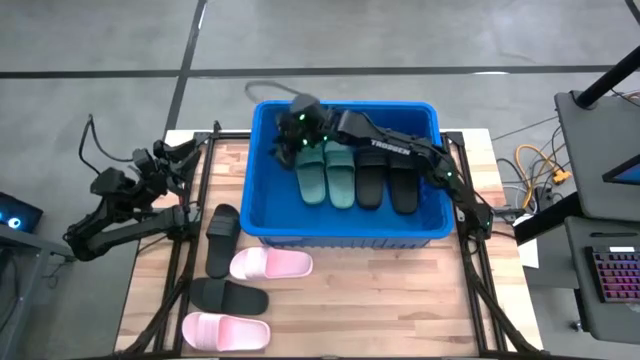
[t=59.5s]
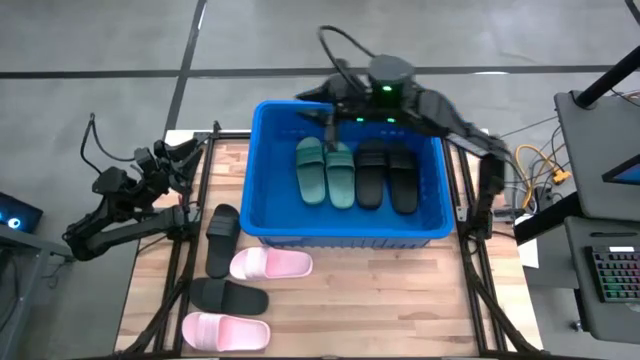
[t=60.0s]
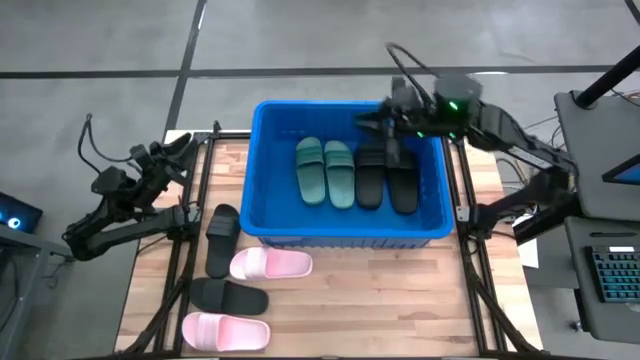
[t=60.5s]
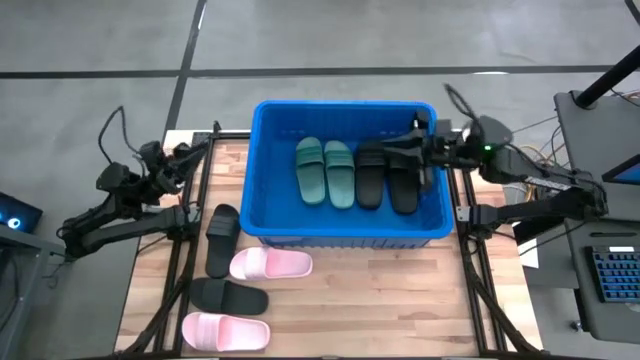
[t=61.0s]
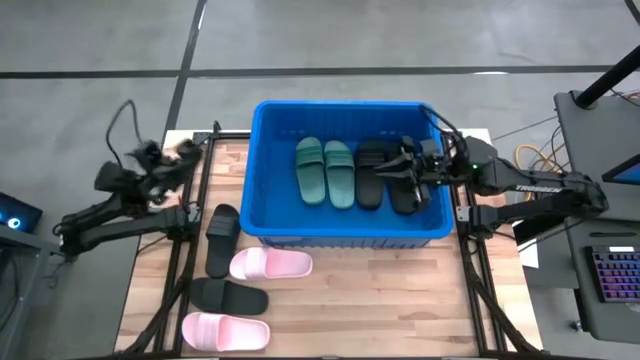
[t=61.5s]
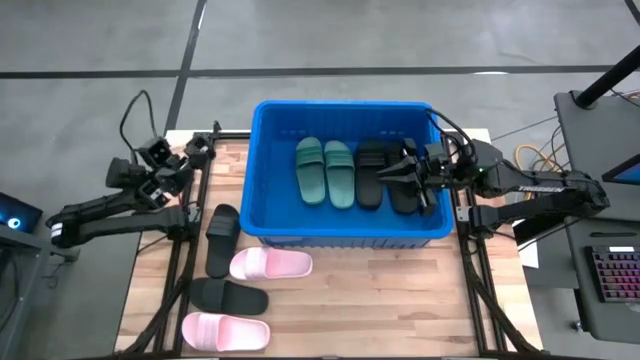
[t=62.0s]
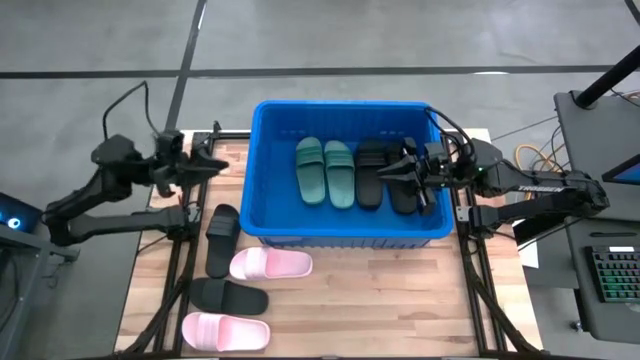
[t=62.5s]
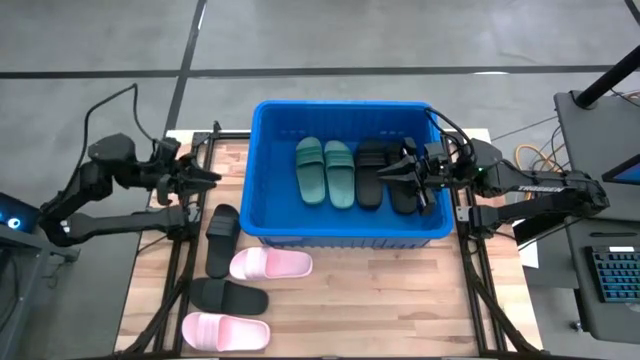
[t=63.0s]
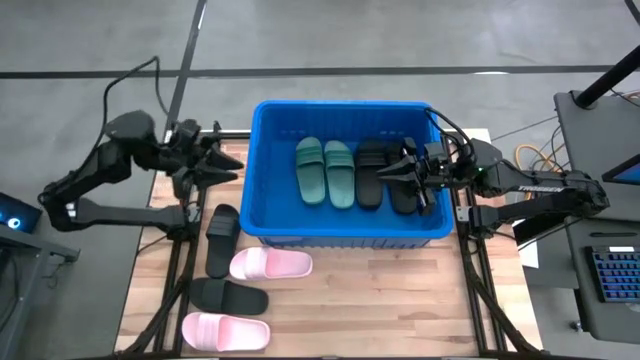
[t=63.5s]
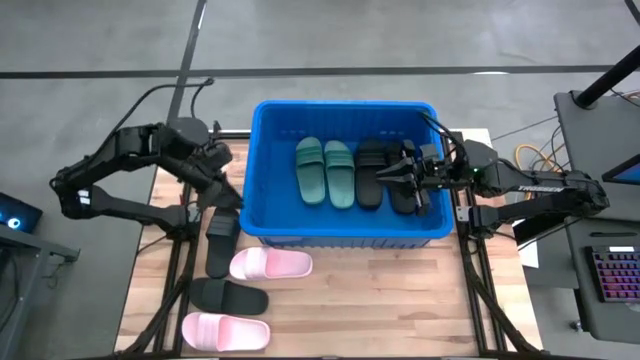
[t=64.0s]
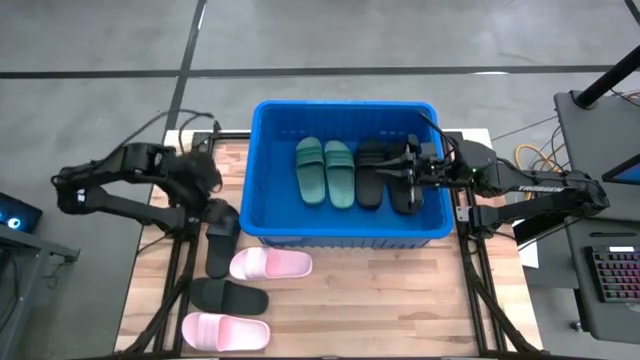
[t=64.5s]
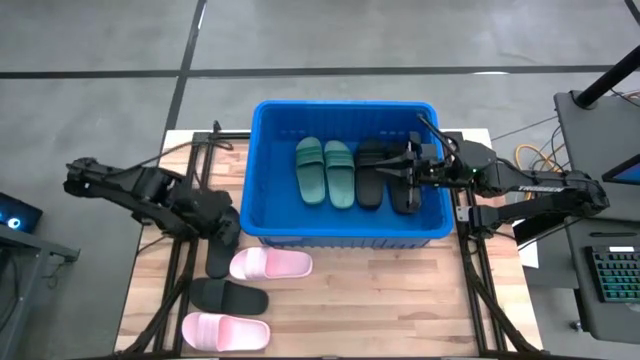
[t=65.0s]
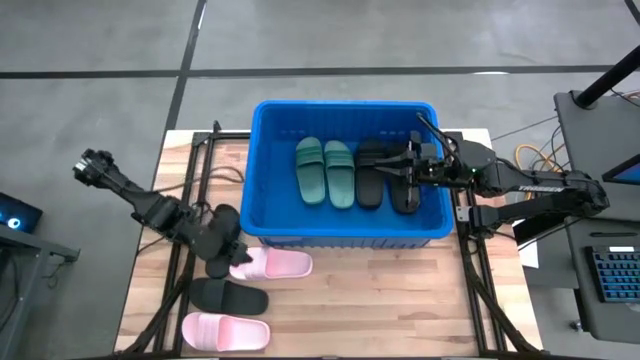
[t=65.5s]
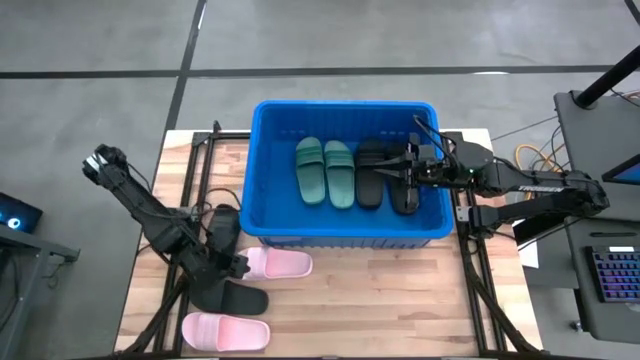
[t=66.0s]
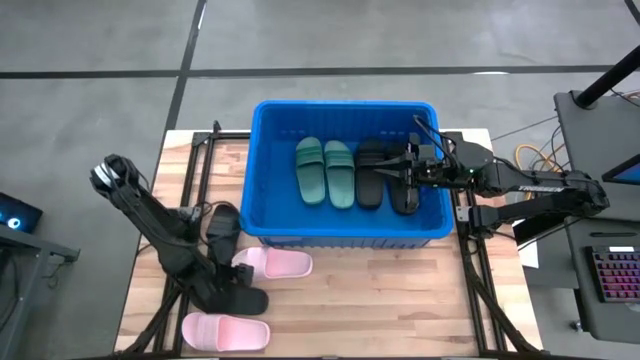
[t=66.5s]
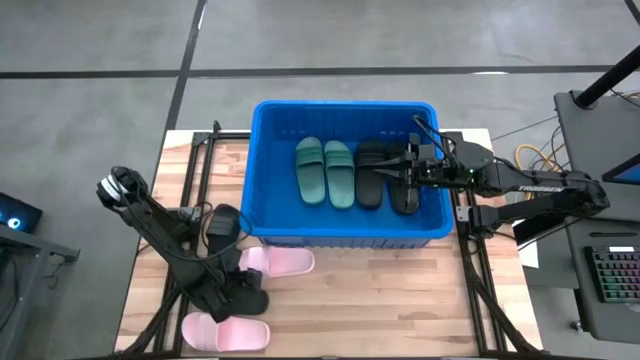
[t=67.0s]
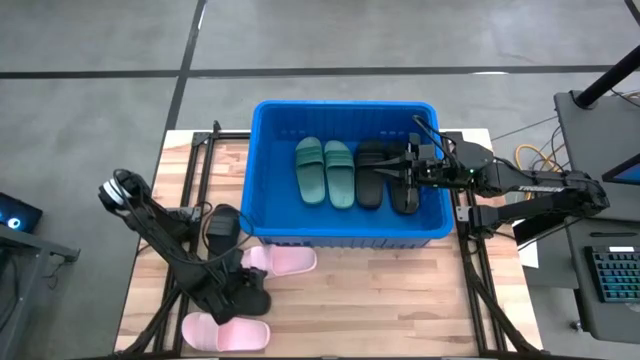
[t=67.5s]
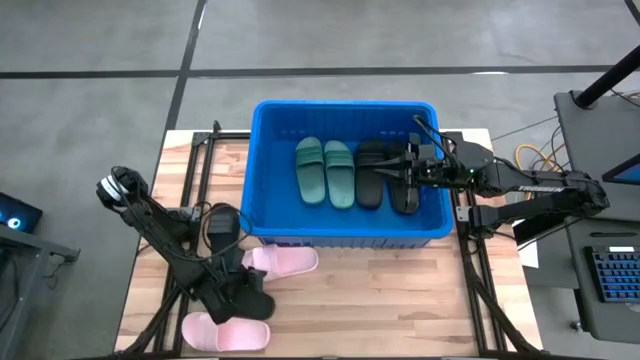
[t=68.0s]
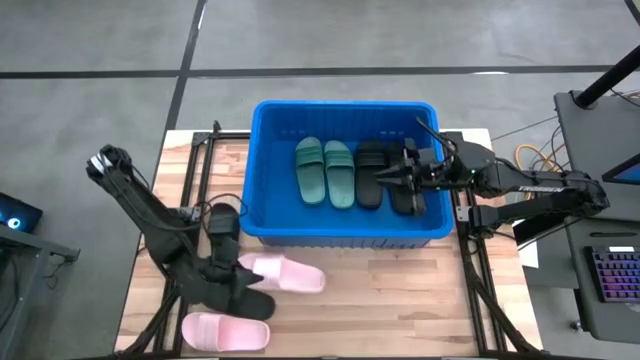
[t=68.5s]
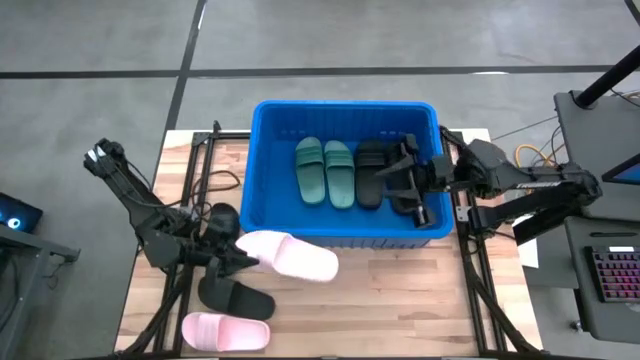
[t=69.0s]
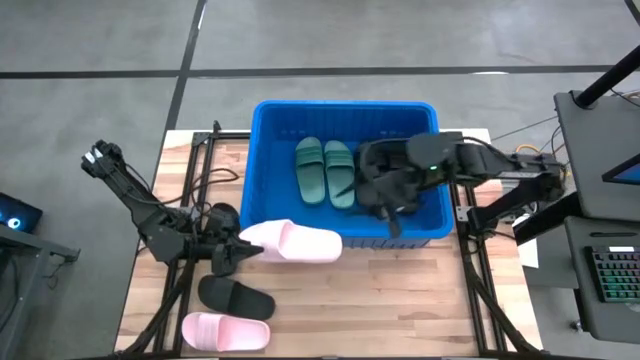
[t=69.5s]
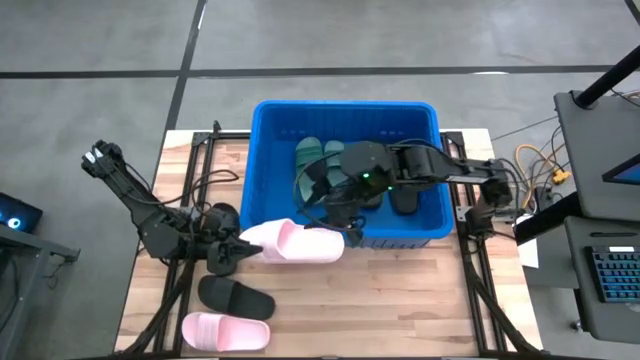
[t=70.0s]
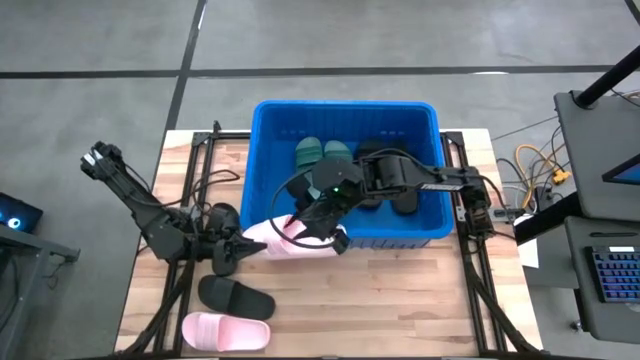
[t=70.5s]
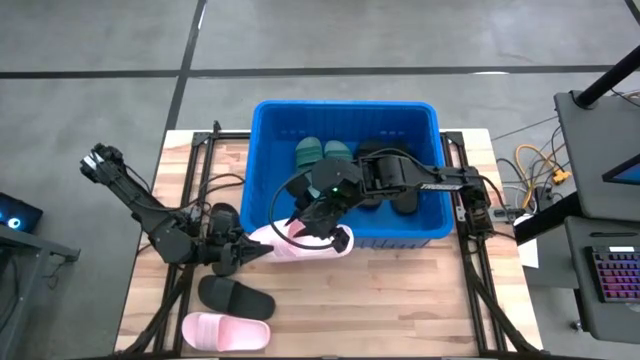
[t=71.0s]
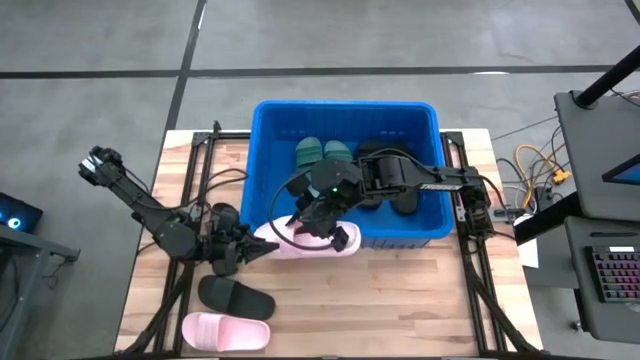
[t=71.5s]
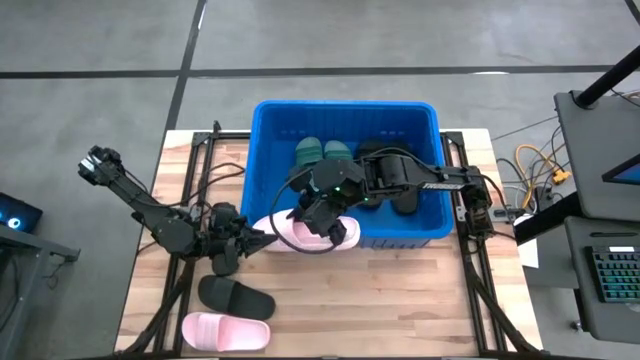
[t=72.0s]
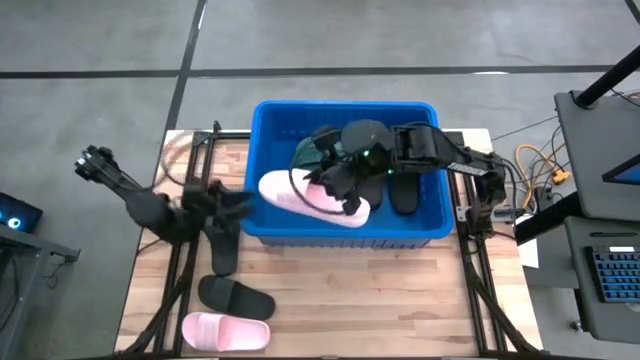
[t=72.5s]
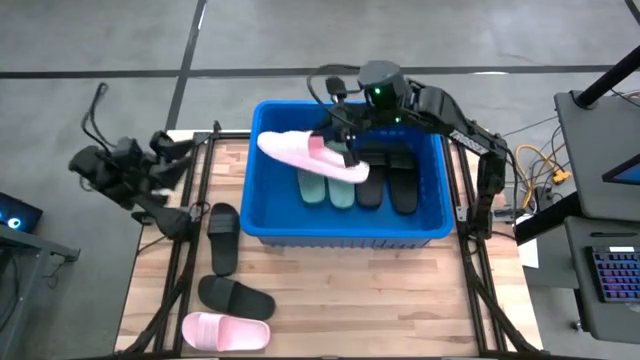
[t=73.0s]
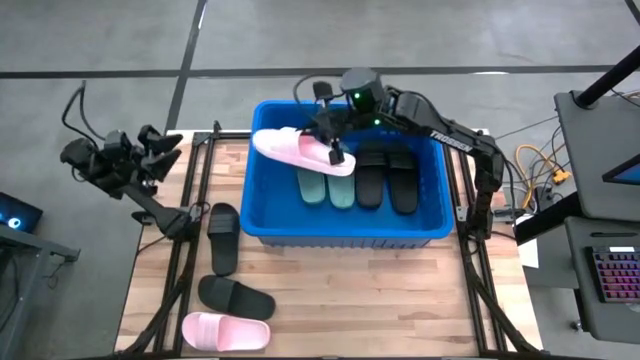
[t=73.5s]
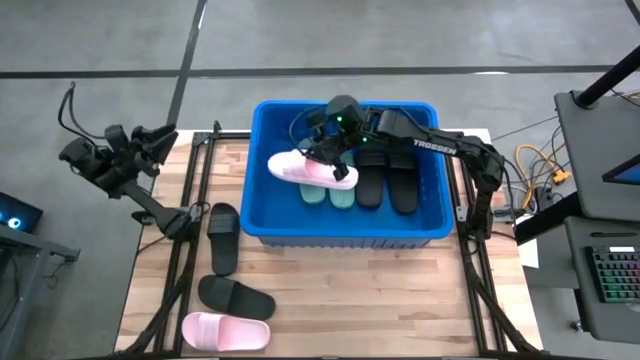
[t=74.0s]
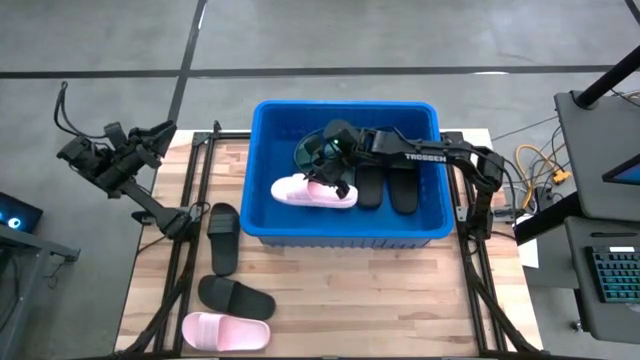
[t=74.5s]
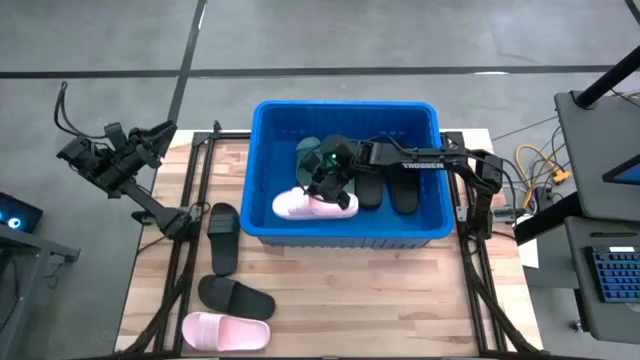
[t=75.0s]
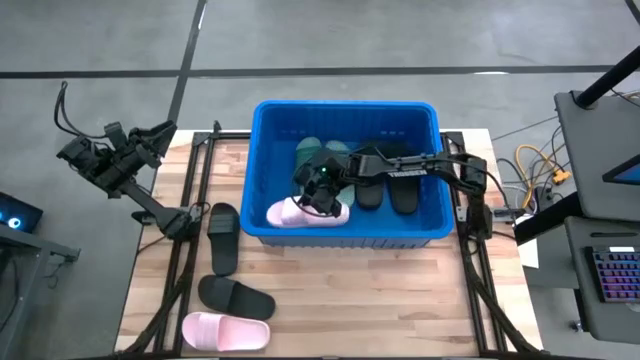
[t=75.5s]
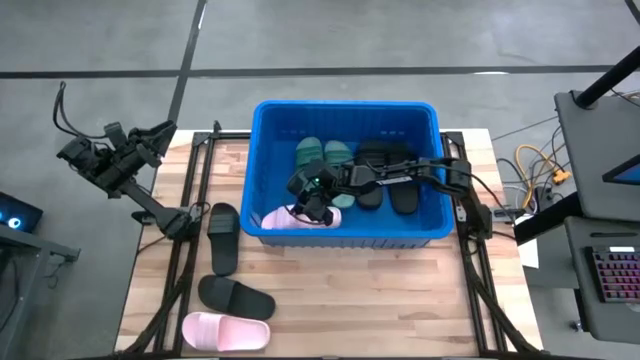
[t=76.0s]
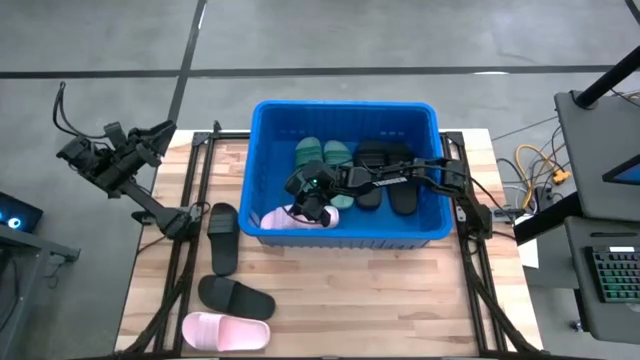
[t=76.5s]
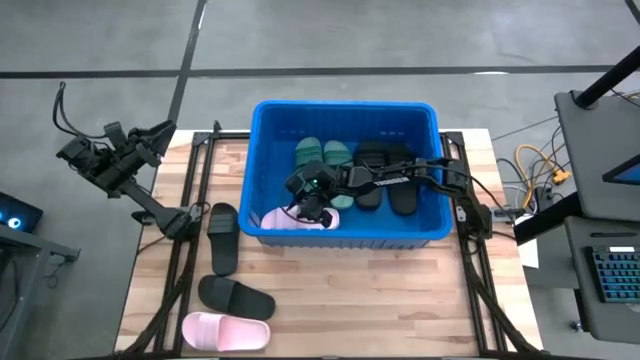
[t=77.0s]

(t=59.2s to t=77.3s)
Task: Pick and place slides into bin
Put the pink slide into the blue container

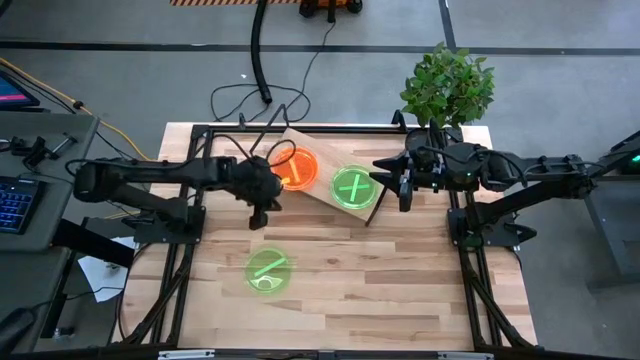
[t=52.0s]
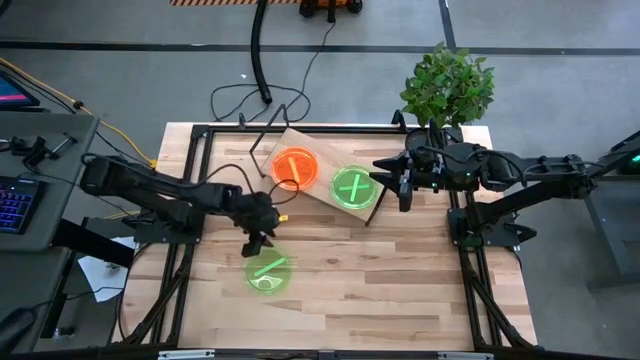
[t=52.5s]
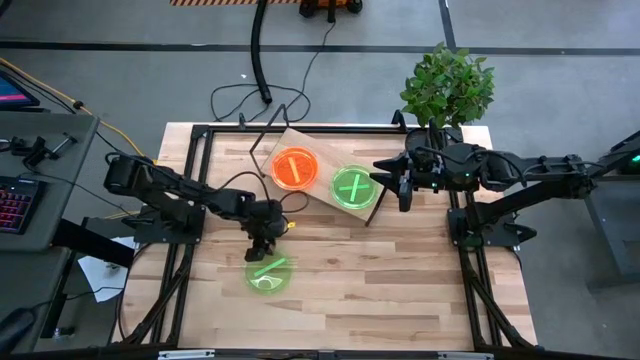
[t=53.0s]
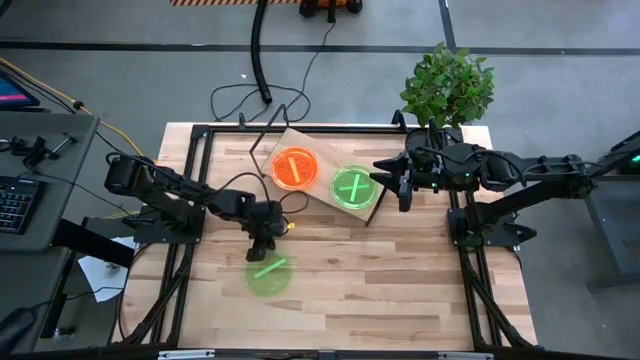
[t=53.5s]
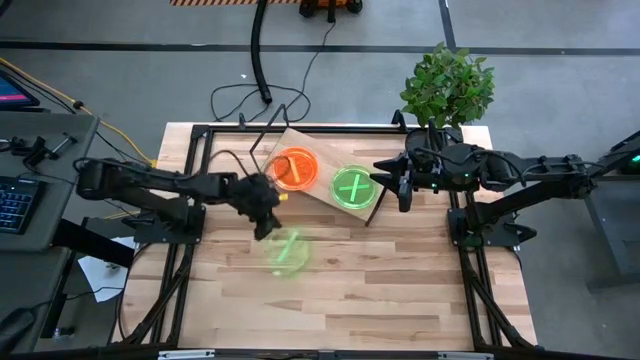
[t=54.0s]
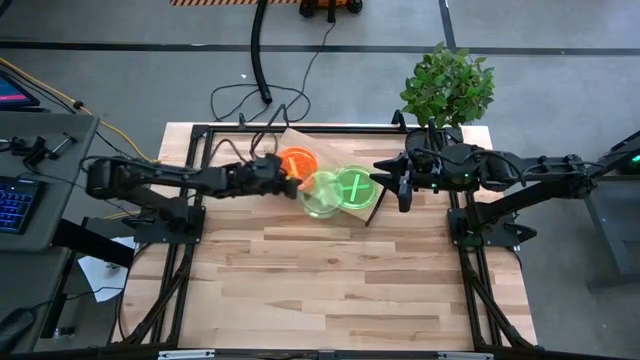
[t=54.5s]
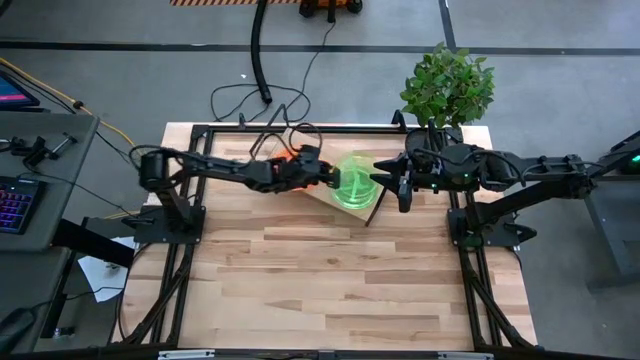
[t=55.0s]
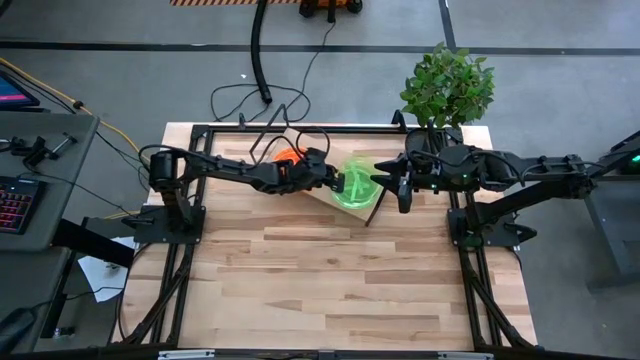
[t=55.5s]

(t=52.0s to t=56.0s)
Task: Place and stack plates onto a shelf
Stack the green plate on the green plate on the shelf
